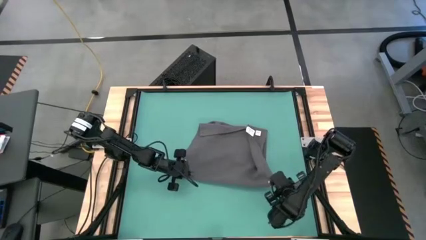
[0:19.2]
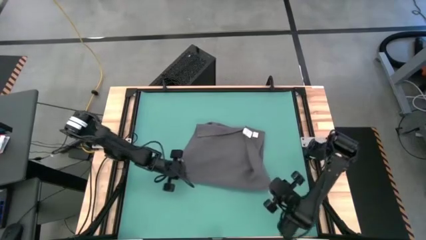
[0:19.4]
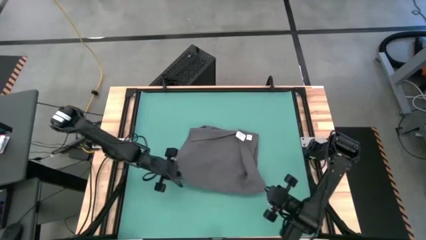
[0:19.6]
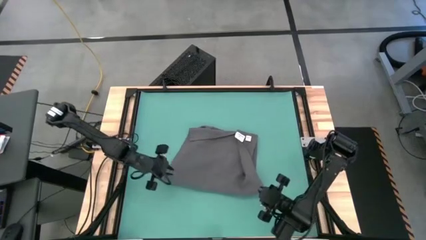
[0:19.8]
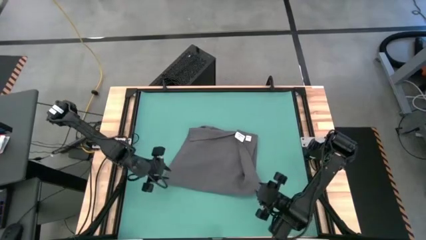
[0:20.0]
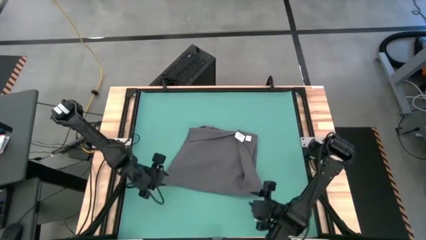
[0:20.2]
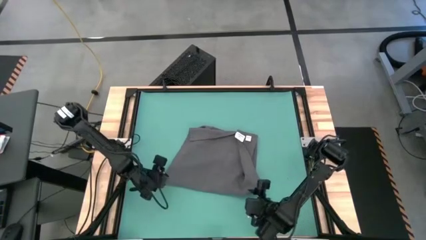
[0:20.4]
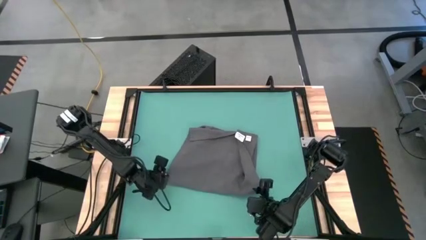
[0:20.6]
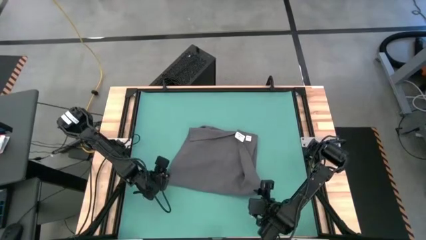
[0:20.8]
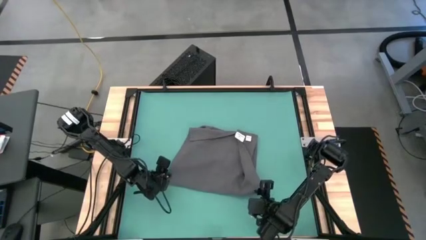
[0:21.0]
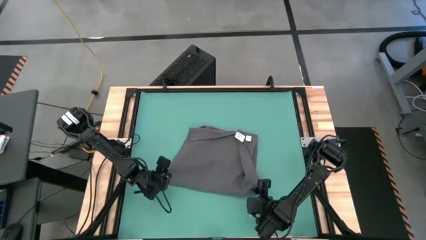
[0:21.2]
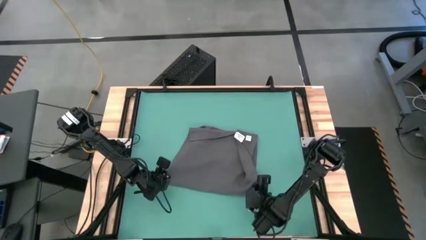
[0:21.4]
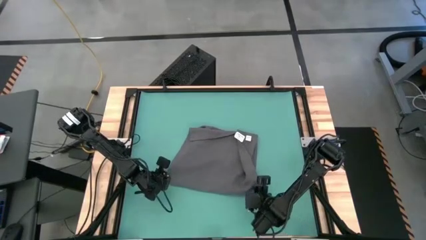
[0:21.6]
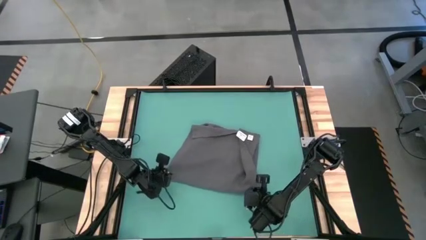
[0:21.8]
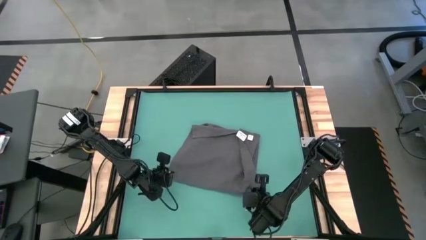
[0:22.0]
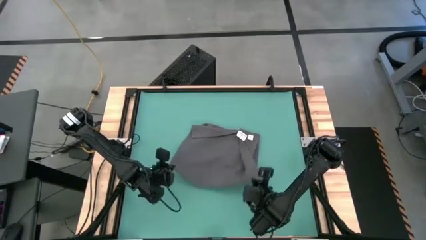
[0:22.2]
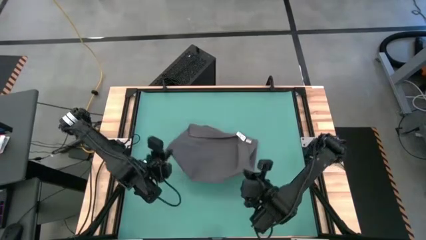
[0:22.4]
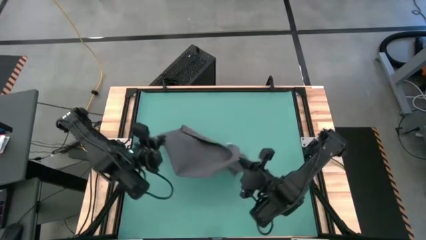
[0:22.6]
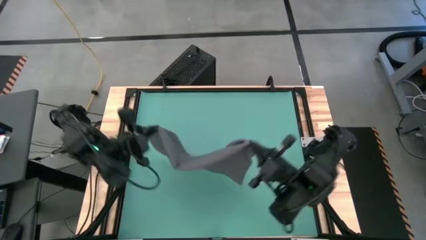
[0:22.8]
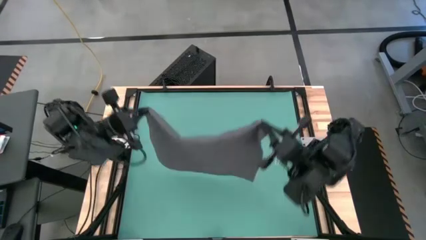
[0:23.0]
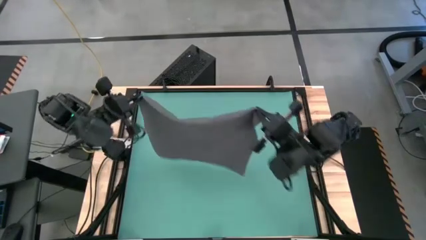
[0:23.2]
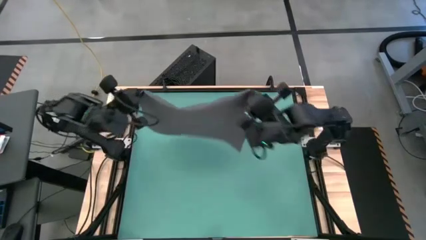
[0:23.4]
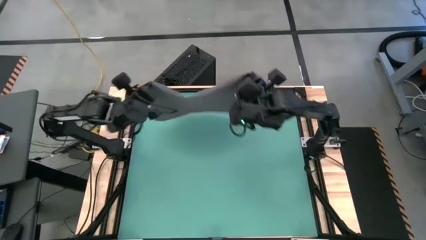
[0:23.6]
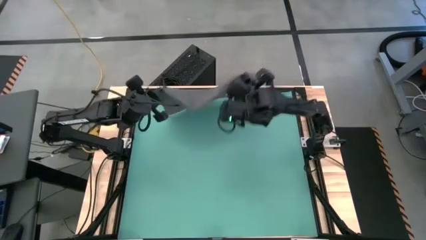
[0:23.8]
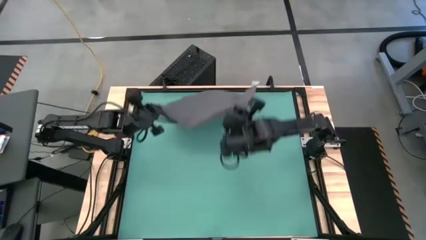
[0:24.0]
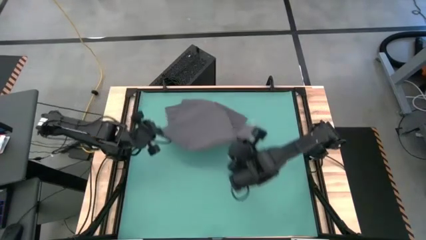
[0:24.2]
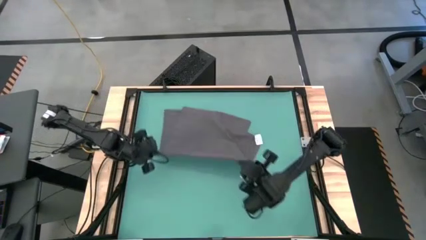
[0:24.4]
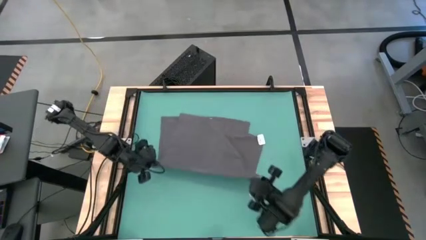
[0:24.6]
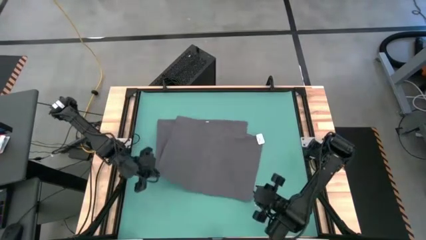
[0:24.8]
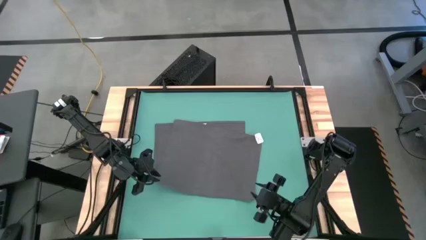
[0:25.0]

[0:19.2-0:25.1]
Task: Roll towel
Roll the gray towel

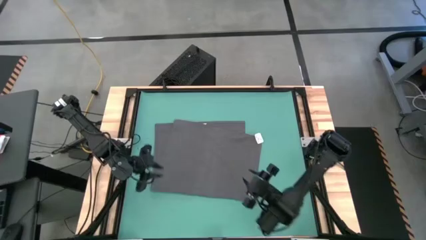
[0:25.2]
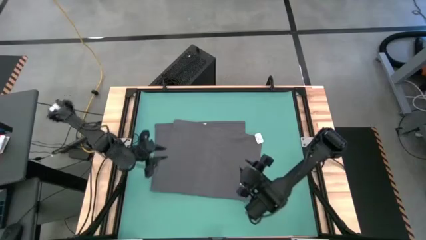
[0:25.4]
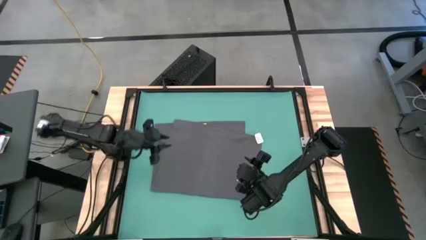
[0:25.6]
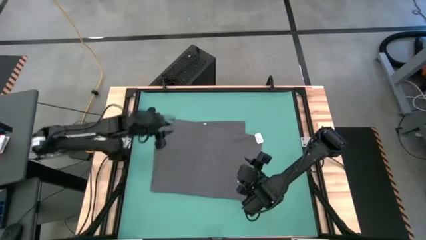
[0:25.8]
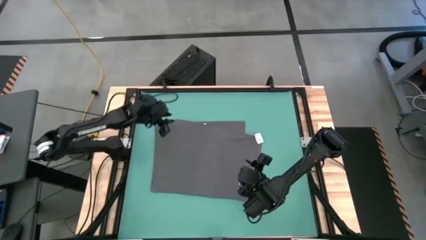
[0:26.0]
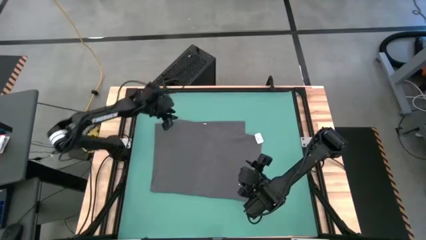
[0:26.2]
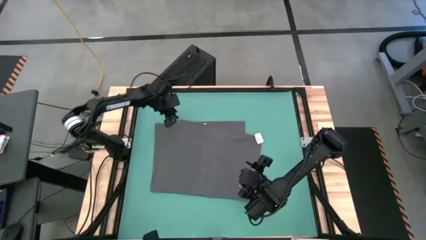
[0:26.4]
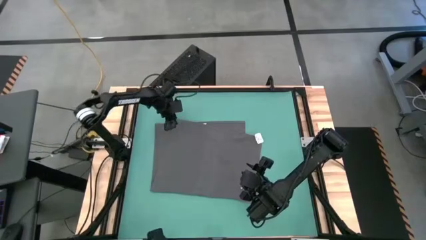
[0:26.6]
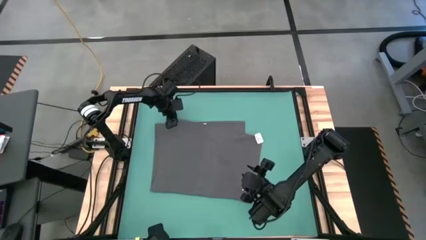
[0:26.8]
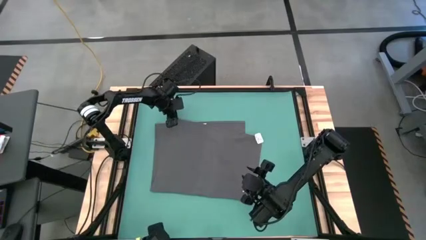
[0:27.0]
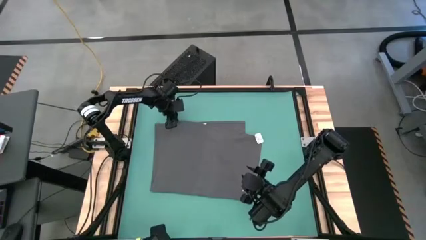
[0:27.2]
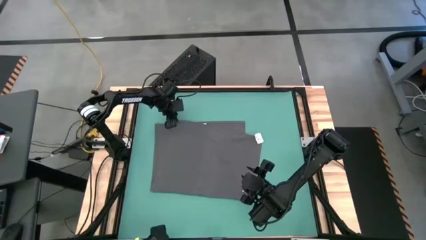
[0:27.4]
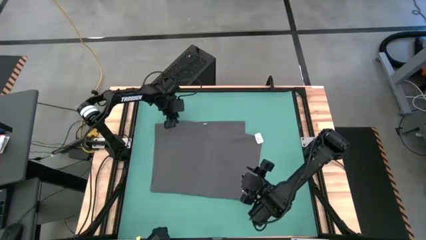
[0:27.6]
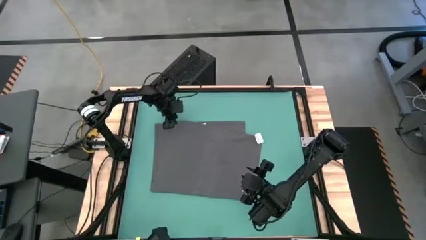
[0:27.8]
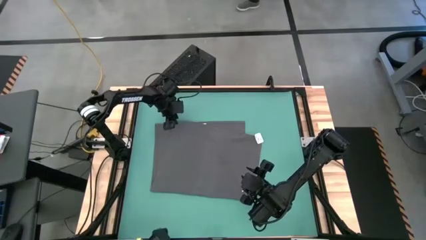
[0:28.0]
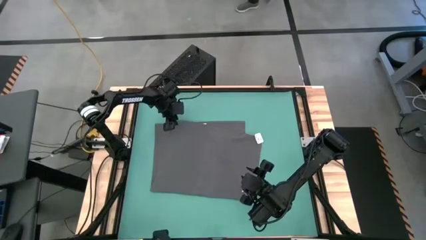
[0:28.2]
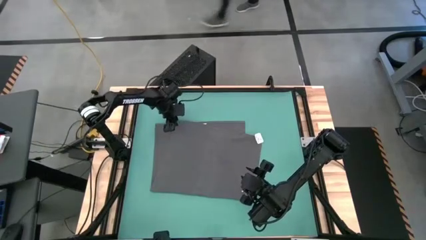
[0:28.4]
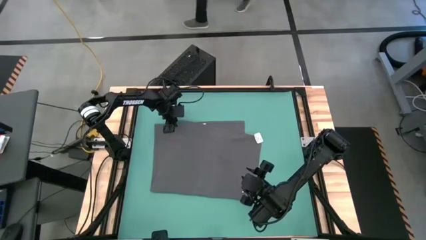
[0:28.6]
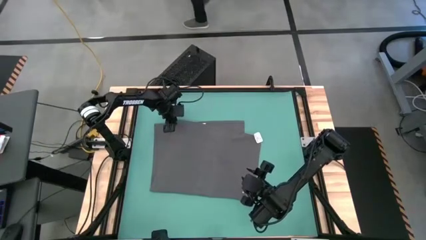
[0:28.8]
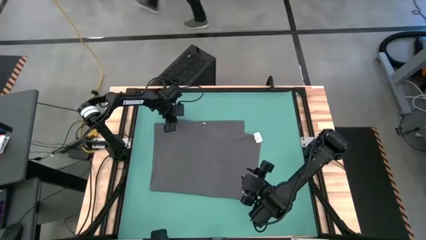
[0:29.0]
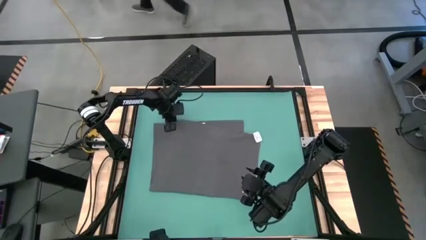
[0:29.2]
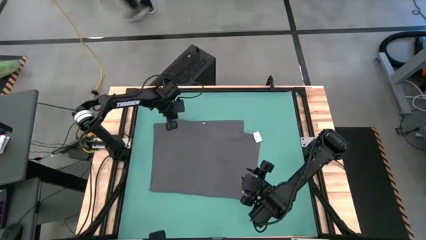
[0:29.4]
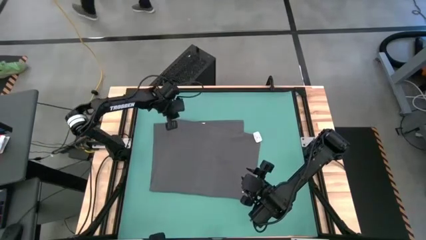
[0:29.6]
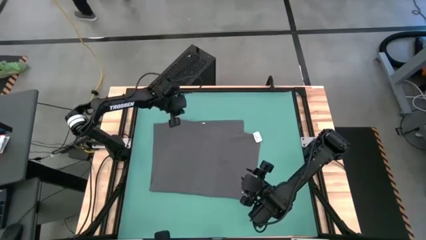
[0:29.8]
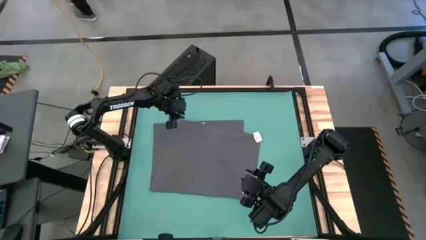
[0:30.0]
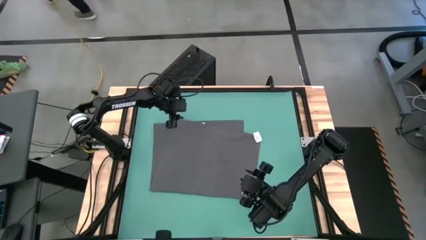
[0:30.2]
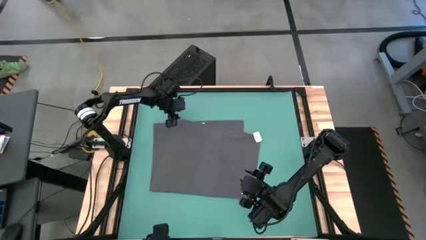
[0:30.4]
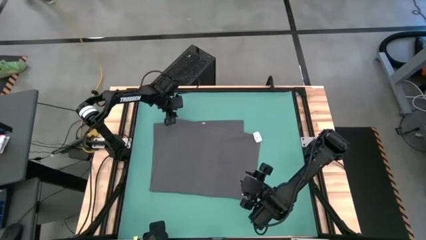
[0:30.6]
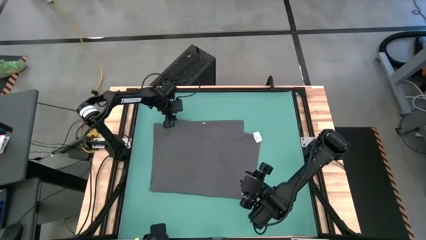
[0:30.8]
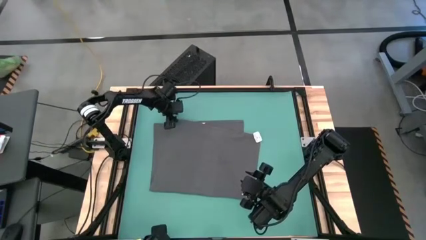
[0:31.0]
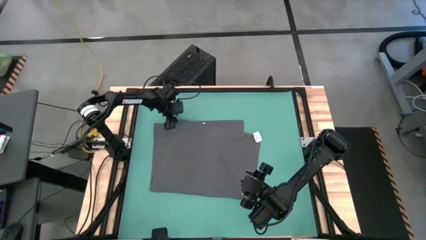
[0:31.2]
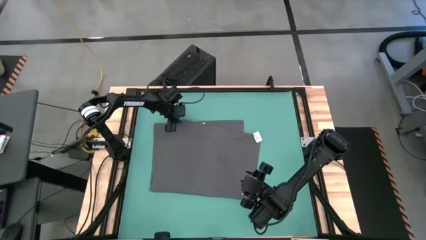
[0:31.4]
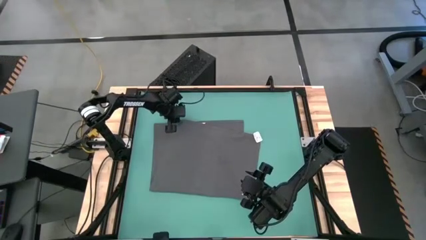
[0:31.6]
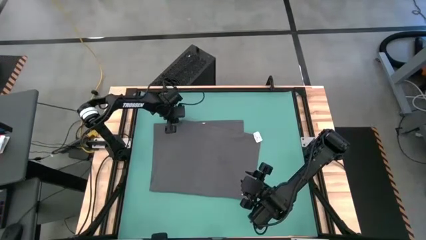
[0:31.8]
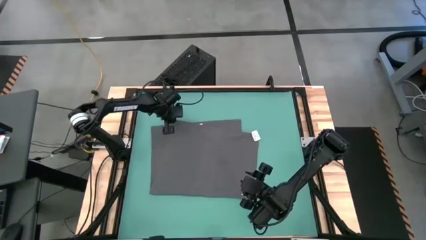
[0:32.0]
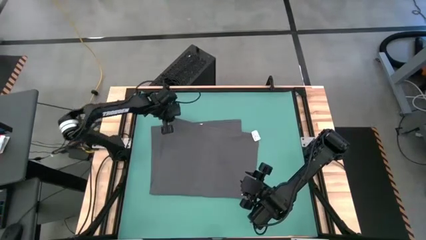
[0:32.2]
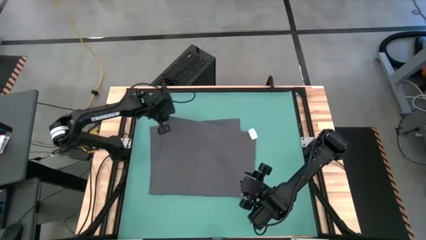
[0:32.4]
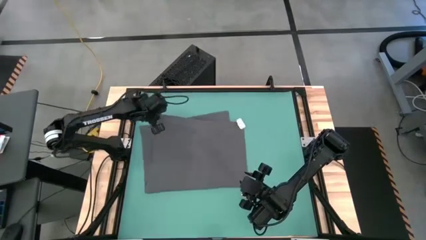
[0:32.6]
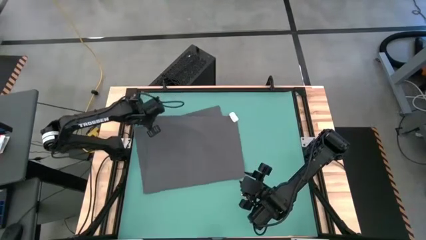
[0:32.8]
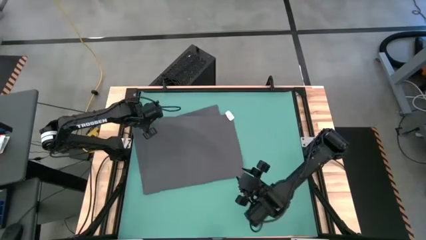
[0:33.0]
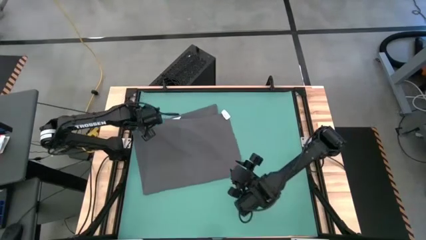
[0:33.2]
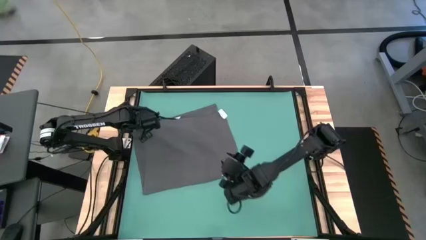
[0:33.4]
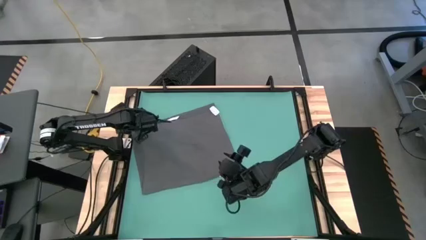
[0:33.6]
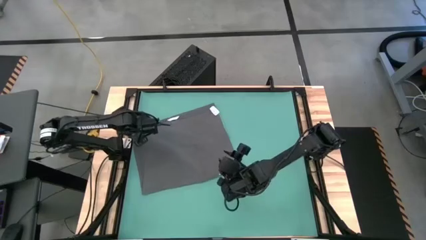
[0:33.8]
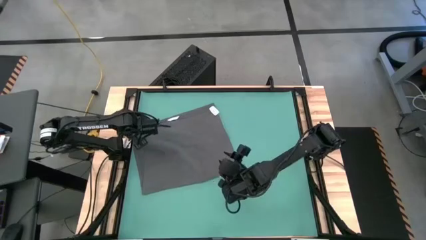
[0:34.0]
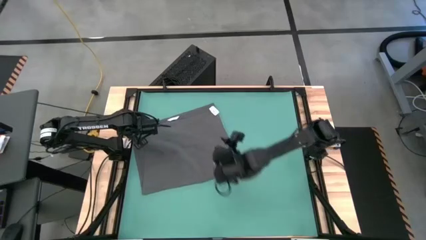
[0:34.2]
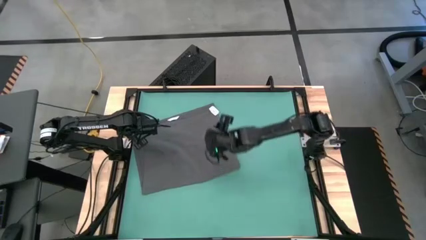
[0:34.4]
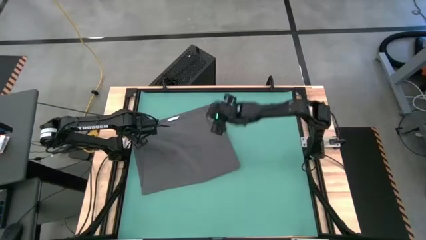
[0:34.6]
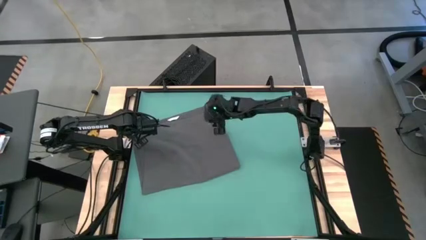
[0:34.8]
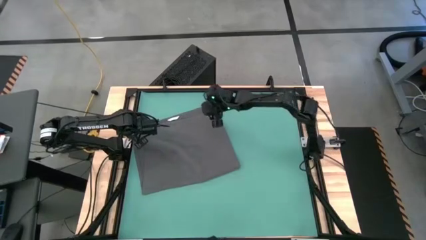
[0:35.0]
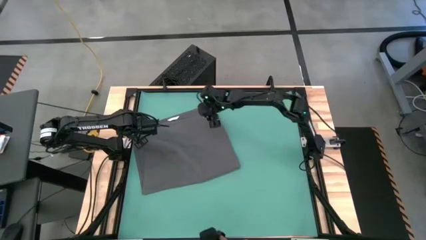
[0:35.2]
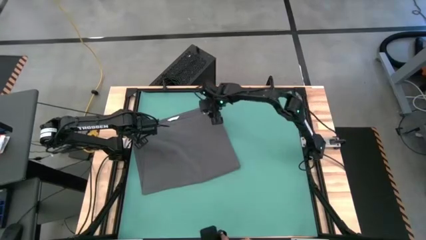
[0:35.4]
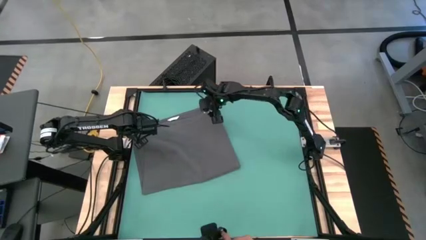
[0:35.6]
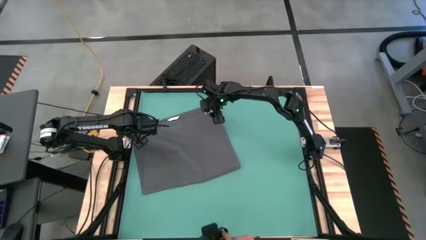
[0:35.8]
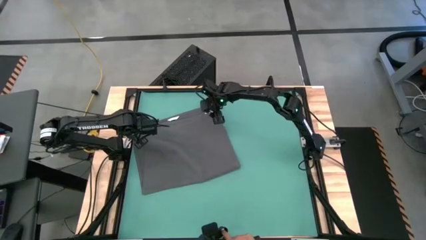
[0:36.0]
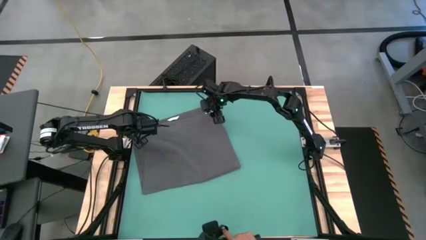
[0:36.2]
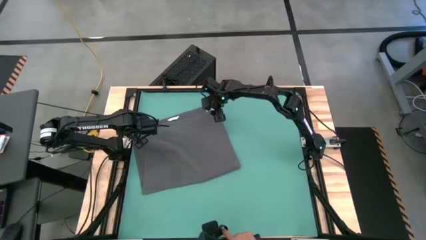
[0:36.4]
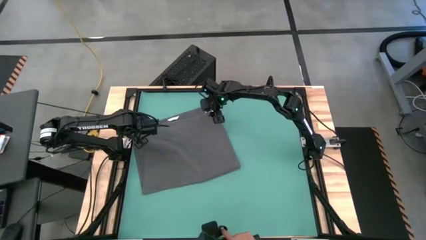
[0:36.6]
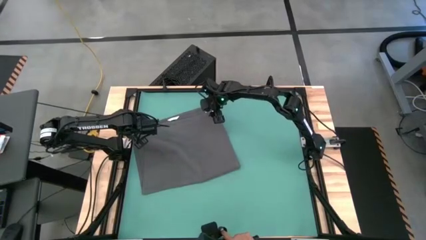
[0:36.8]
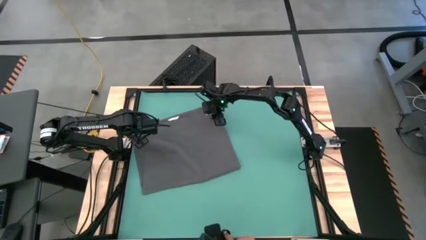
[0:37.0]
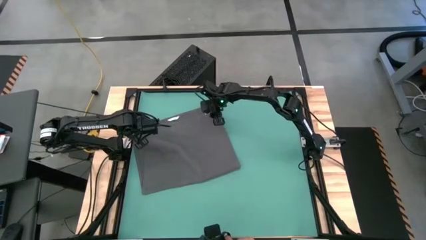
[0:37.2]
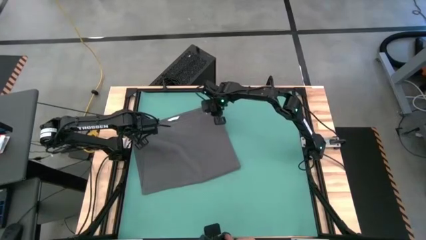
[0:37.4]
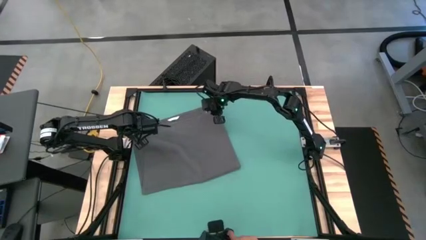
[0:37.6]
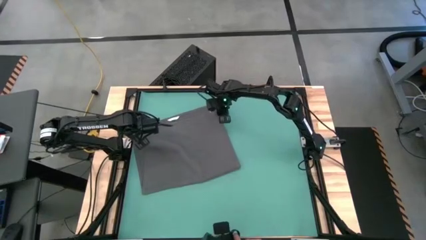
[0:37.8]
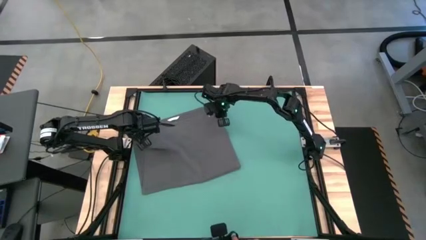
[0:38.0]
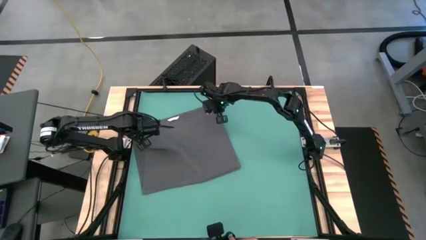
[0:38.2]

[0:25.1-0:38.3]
Roll the gray towel
